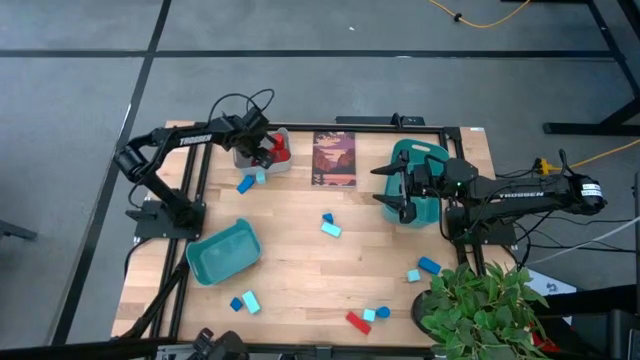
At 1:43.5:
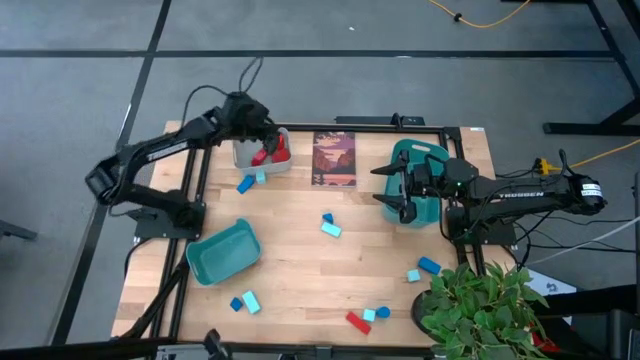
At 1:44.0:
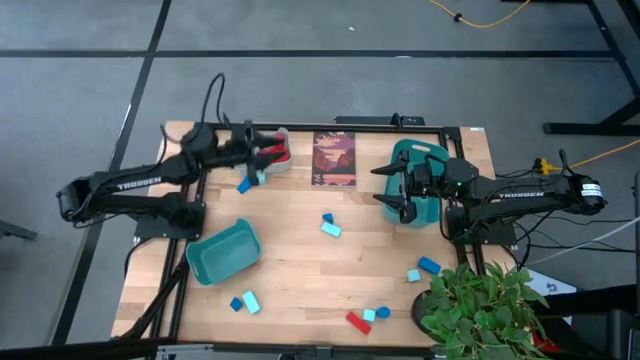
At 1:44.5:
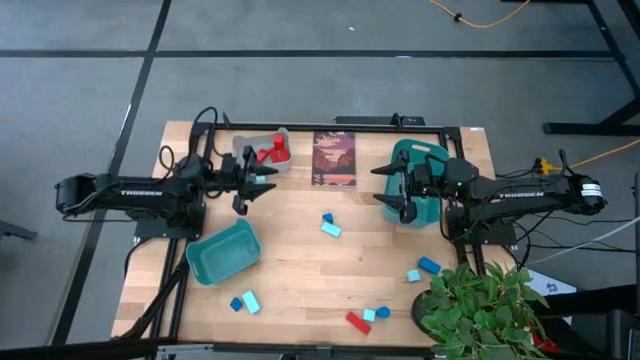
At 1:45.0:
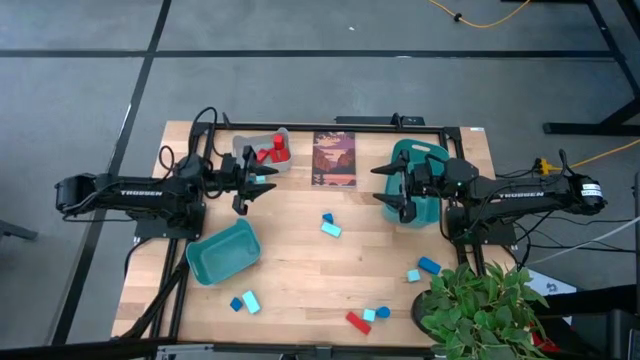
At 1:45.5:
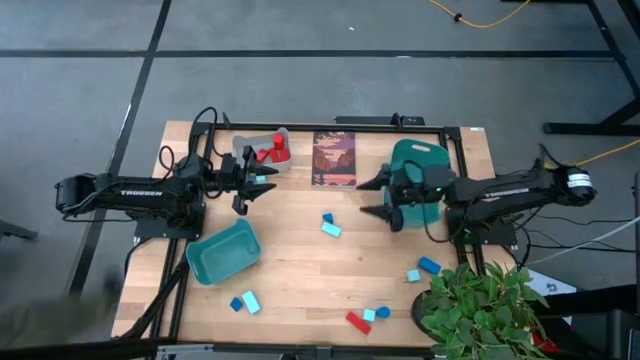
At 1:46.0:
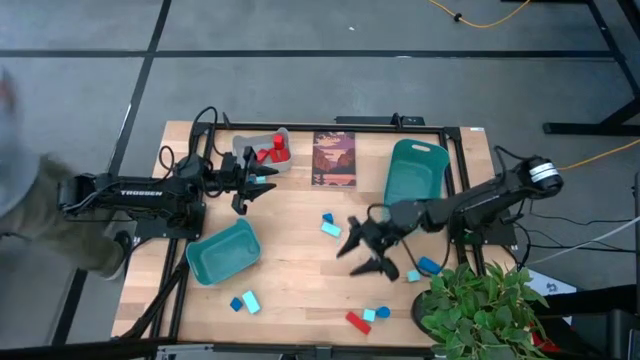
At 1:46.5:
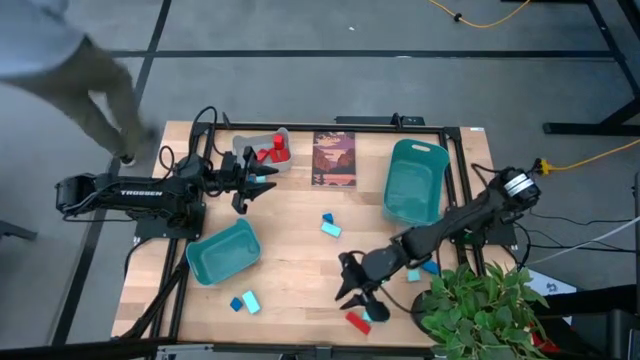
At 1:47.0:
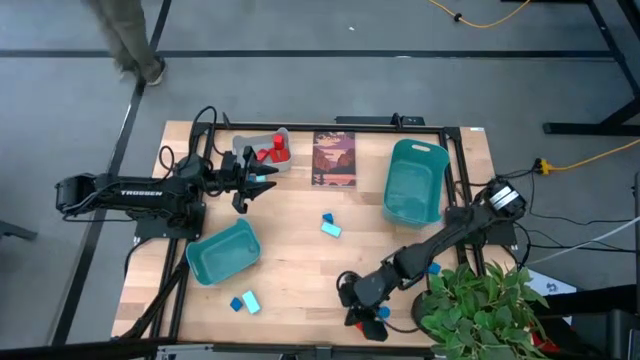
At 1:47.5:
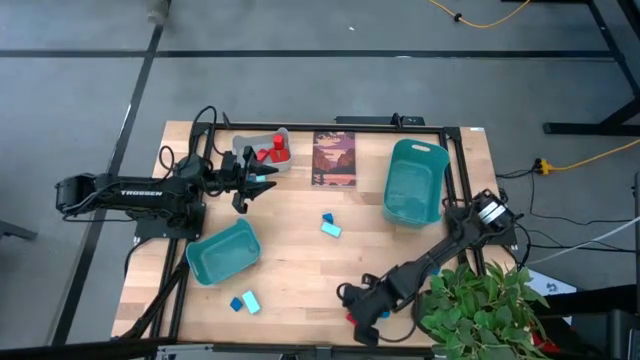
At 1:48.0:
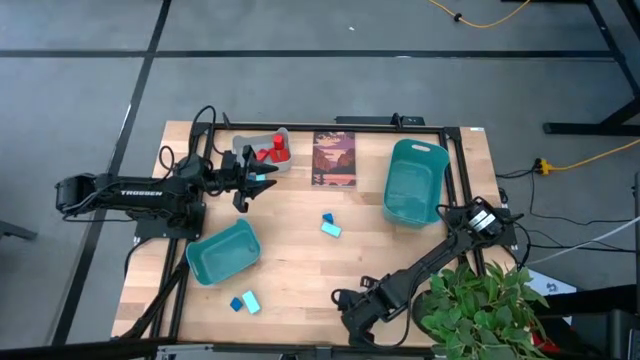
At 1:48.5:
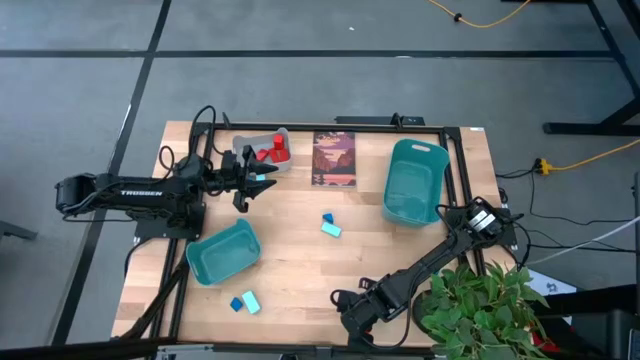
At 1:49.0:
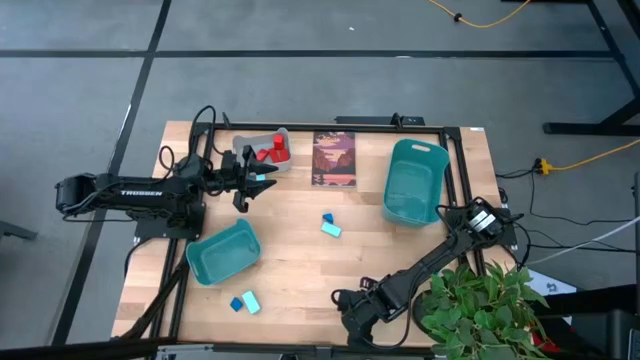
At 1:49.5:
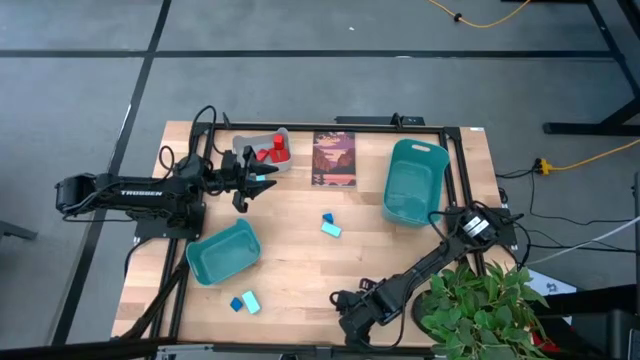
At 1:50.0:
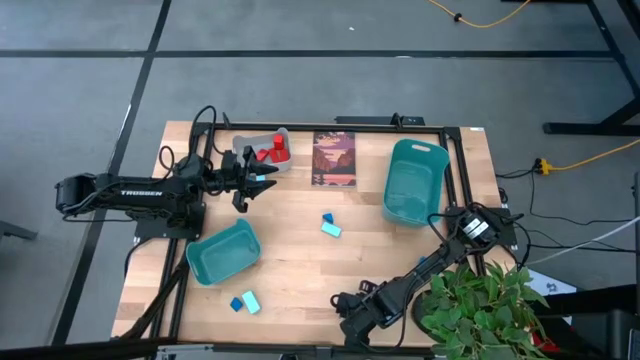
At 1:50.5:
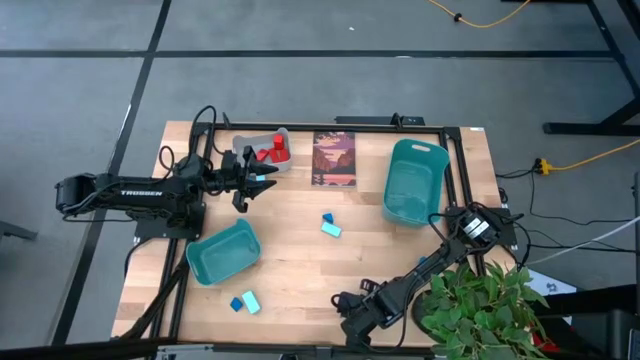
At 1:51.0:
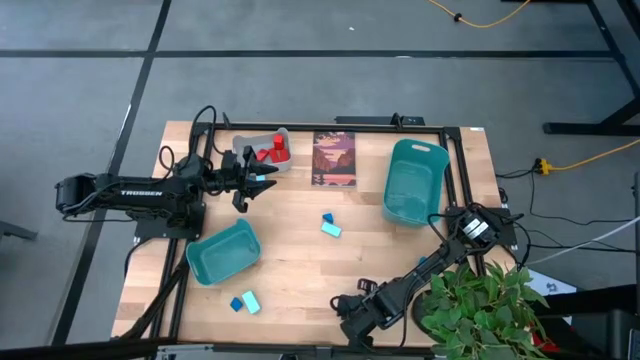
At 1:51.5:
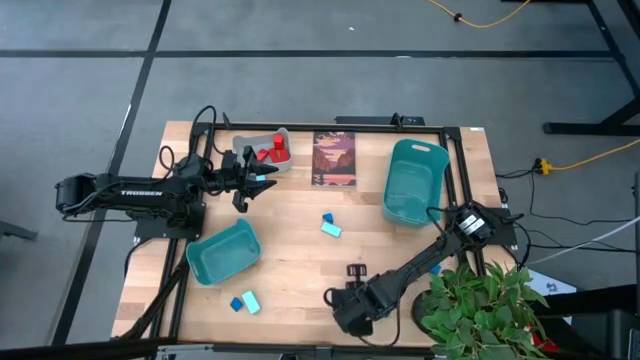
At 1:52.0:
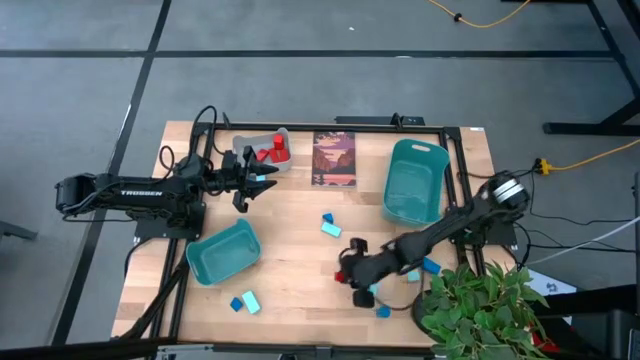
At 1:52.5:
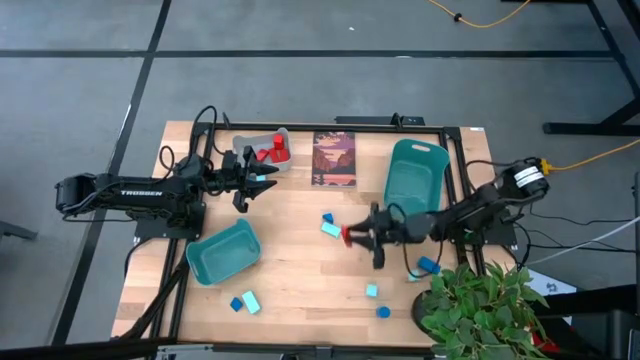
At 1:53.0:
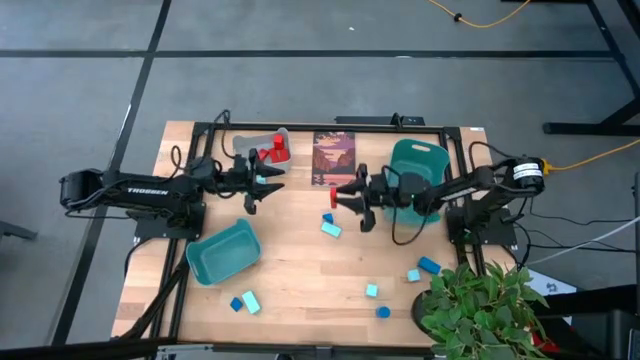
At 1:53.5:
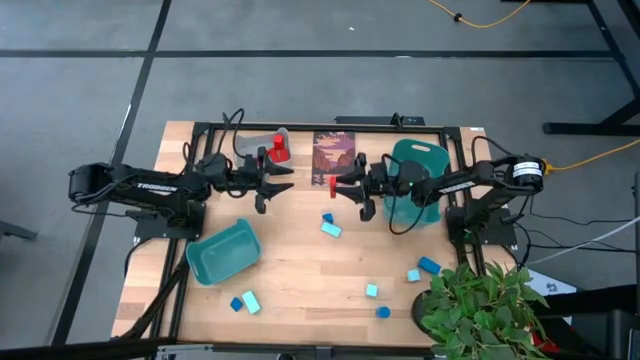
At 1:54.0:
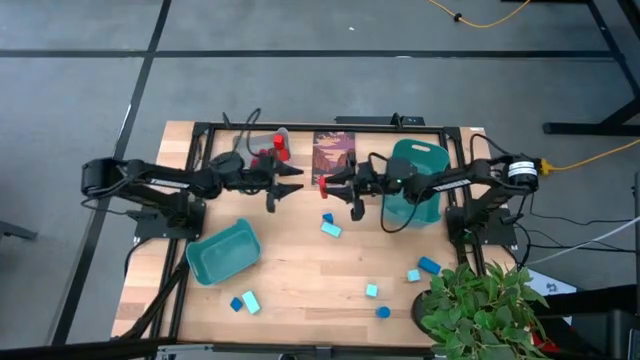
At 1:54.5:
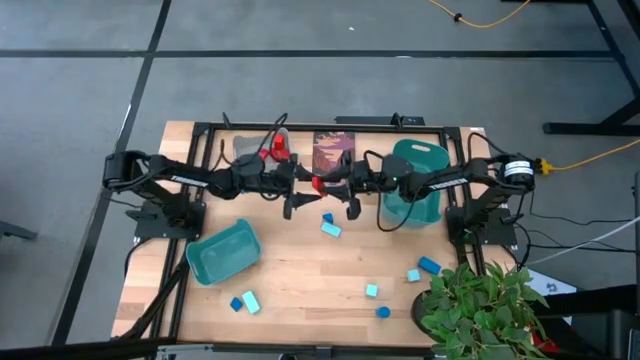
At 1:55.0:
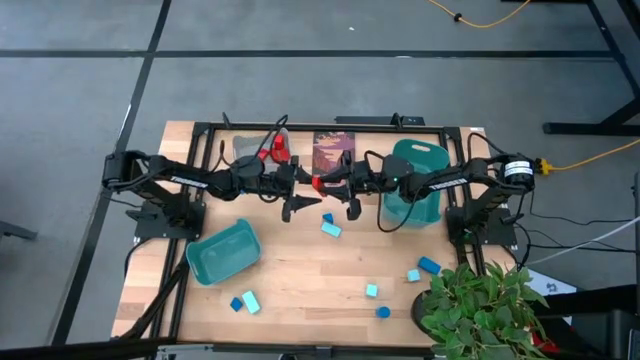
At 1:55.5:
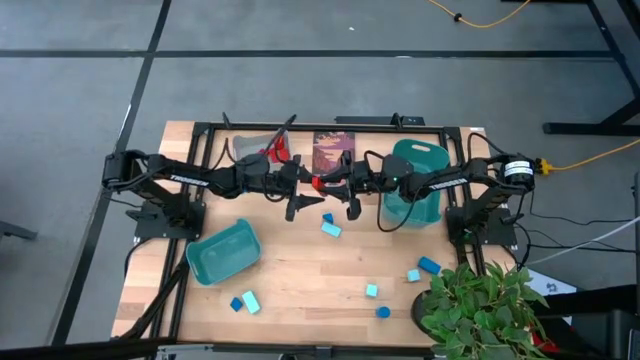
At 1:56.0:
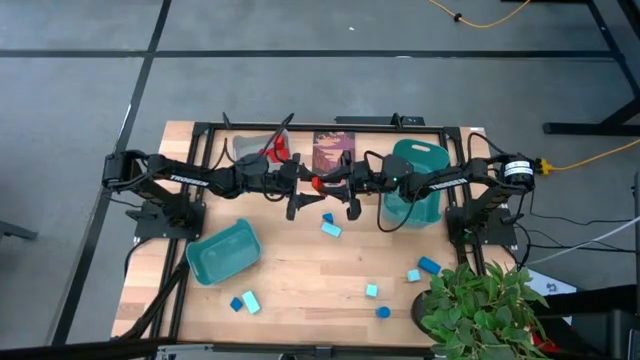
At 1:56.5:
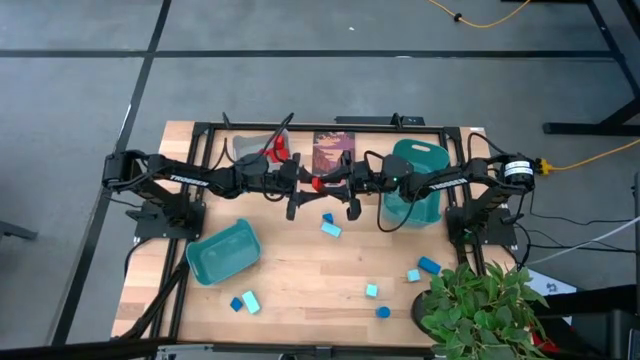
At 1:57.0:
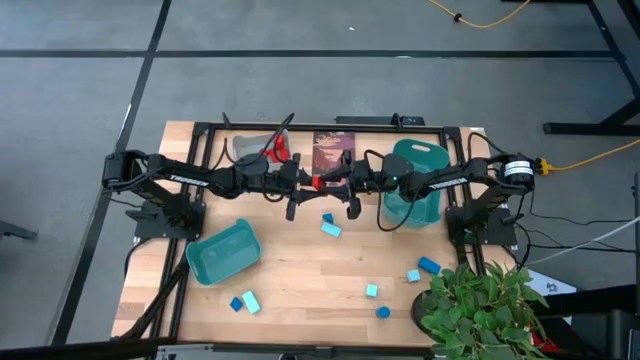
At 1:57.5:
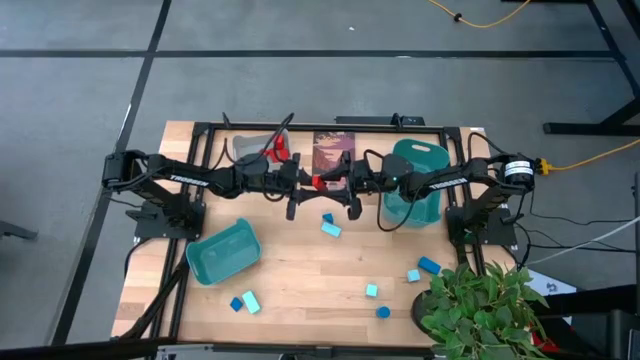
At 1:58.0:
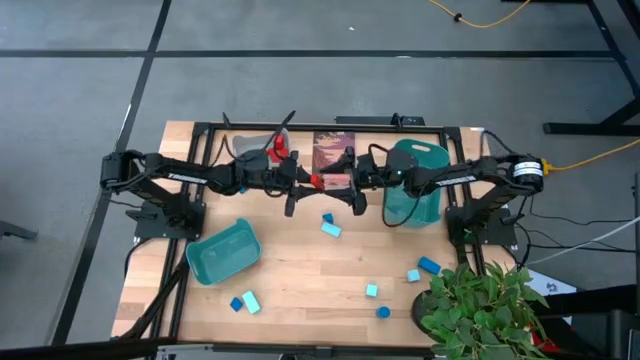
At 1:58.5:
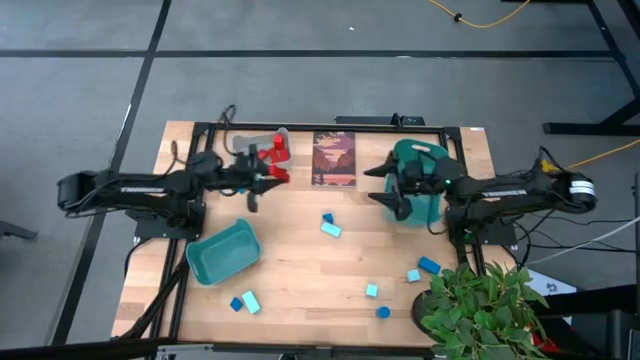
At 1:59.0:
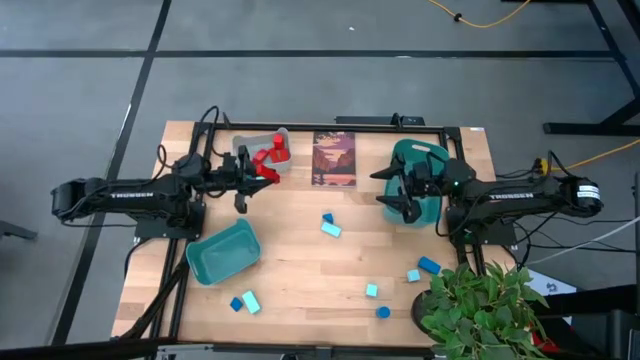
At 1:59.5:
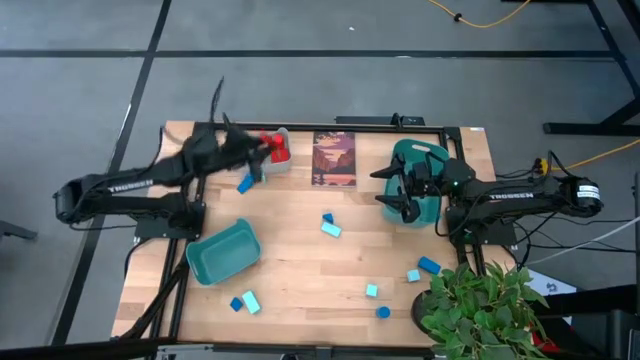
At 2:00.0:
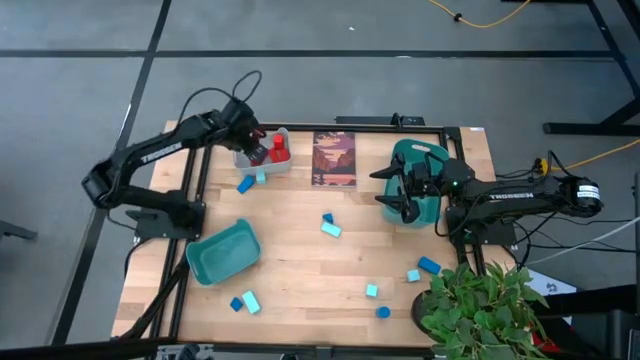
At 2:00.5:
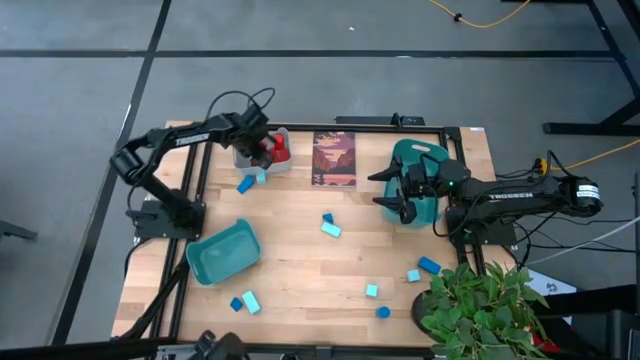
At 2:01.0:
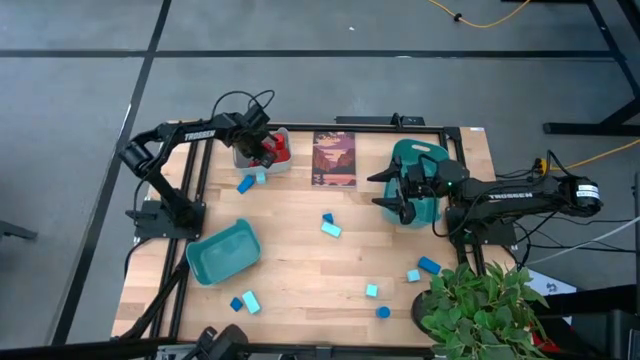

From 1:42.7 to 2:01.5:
Task: Sort & place blocks by color
Put the red block into the gray bin

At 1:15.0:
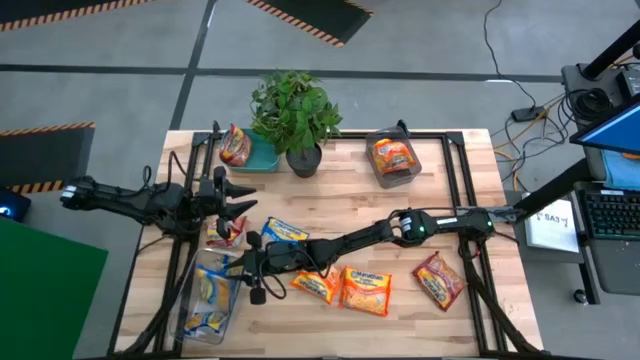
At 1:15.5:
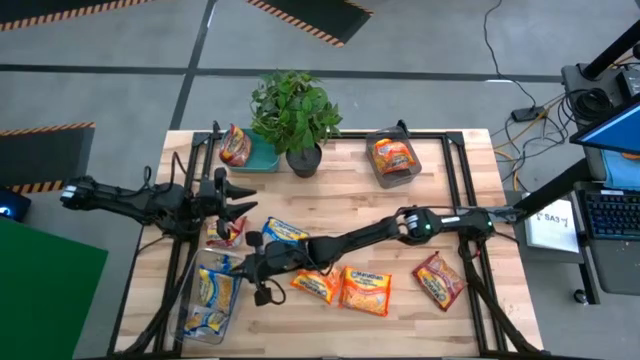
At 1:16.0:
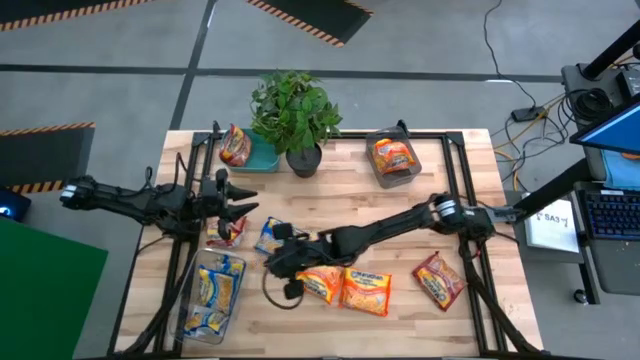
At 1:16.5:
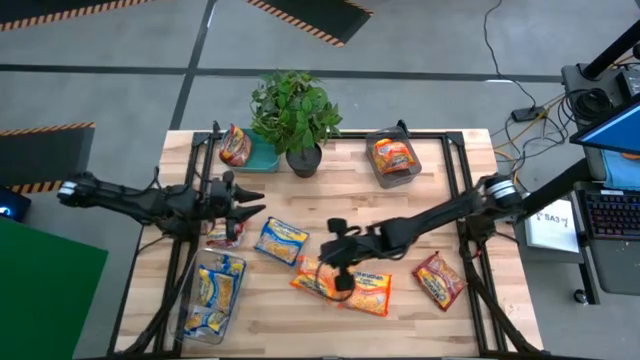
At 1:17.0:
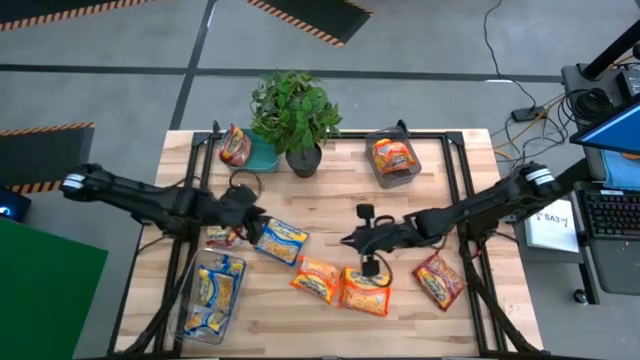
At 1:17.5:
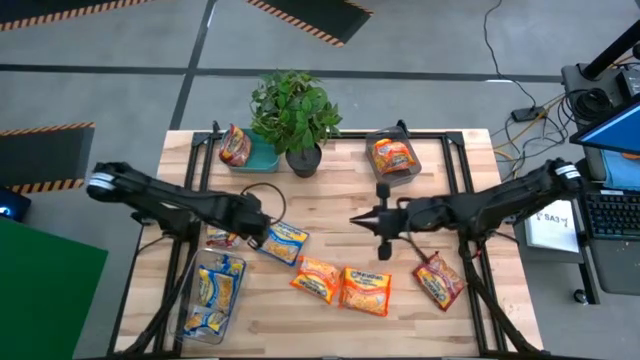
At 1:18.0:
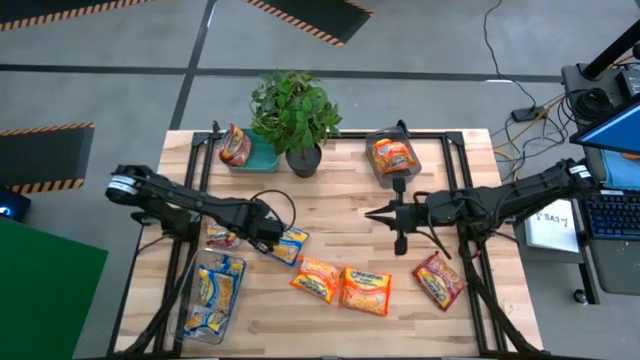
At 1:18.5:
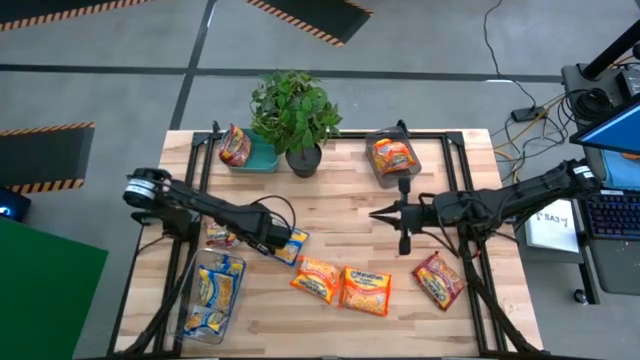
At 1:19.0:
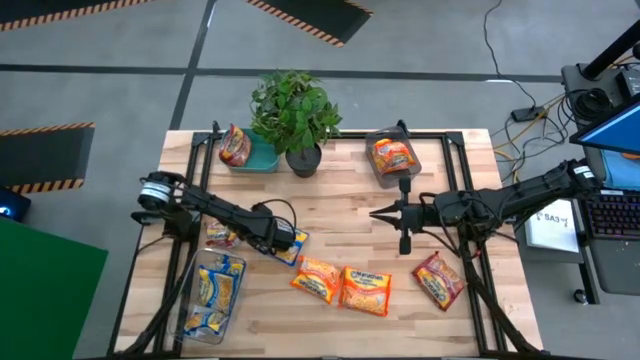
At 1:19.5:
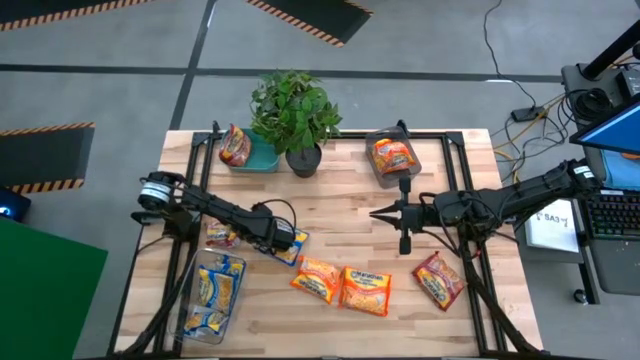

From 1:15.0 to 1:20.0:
Task: Sort Maruchan noodles
Put the red noodle pack into the green bin
